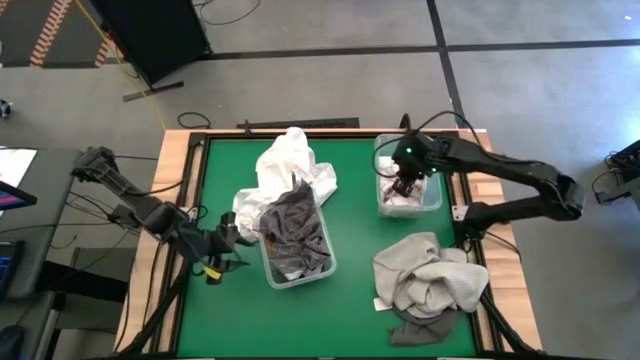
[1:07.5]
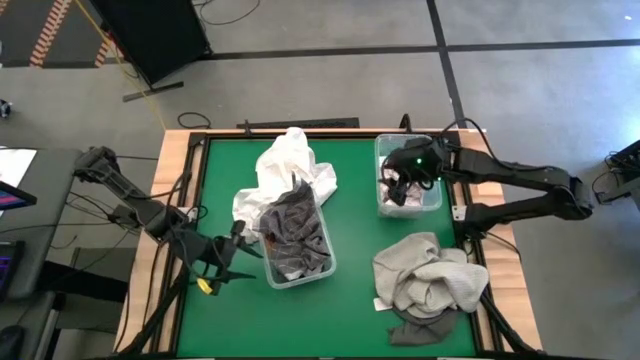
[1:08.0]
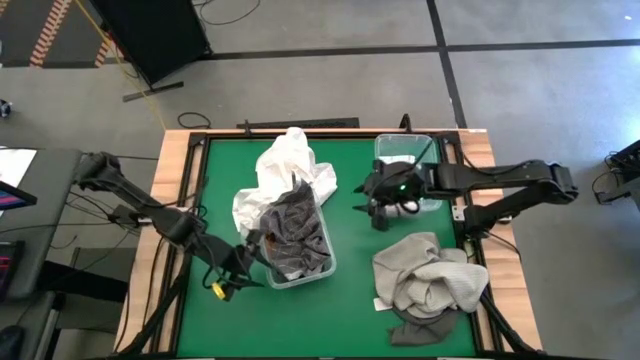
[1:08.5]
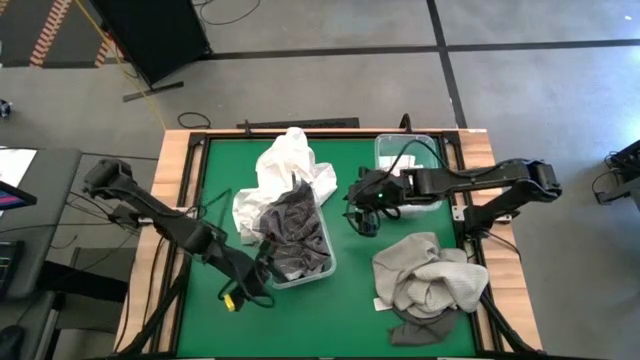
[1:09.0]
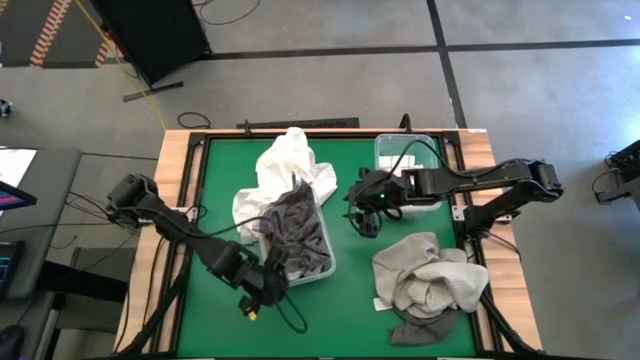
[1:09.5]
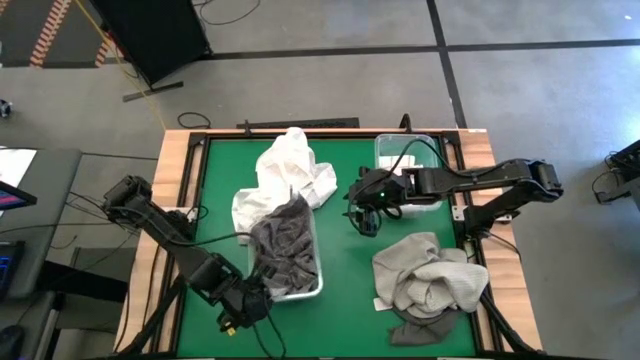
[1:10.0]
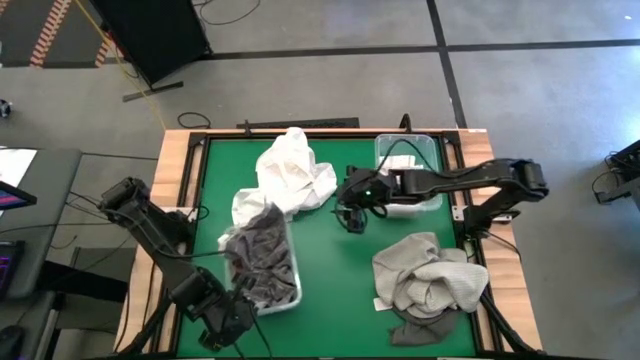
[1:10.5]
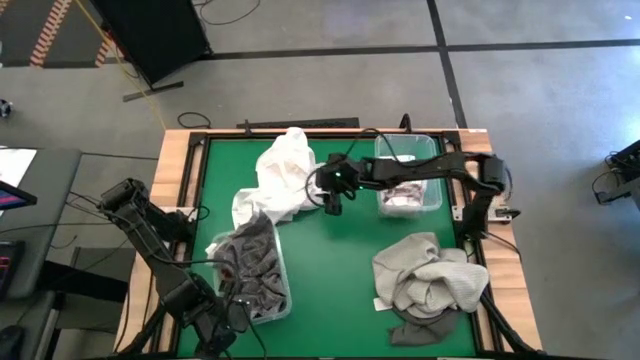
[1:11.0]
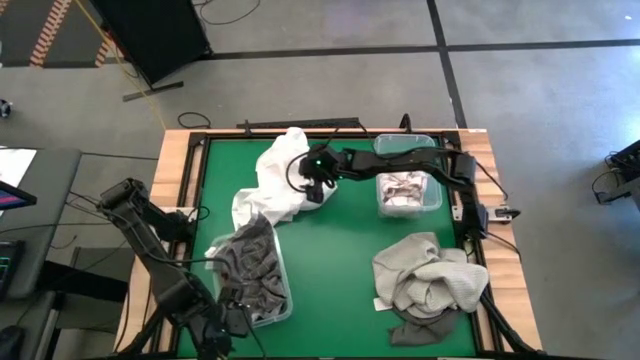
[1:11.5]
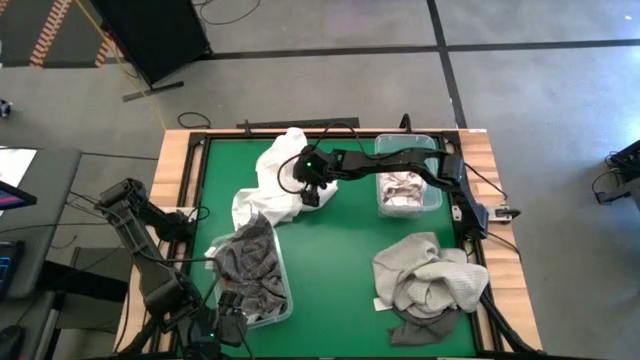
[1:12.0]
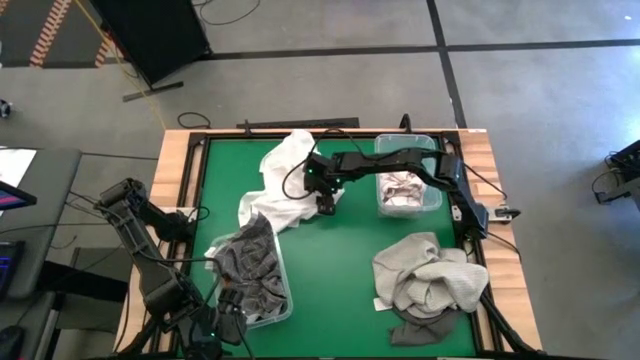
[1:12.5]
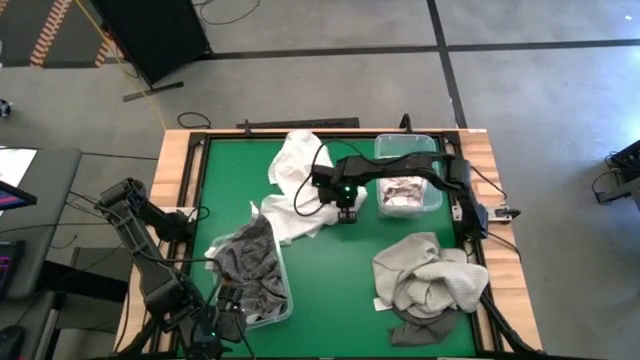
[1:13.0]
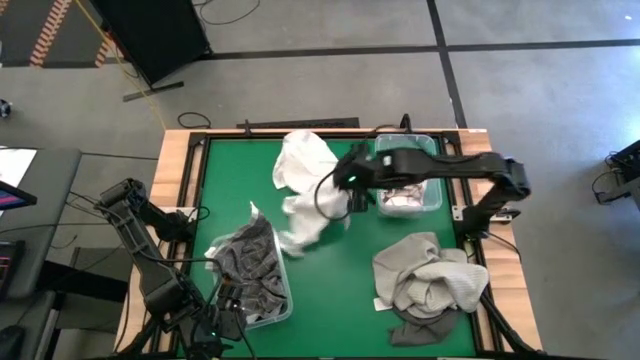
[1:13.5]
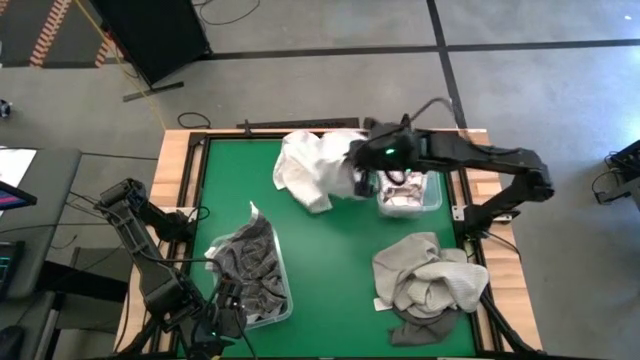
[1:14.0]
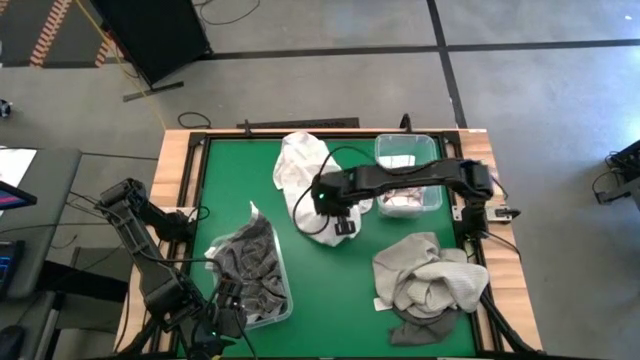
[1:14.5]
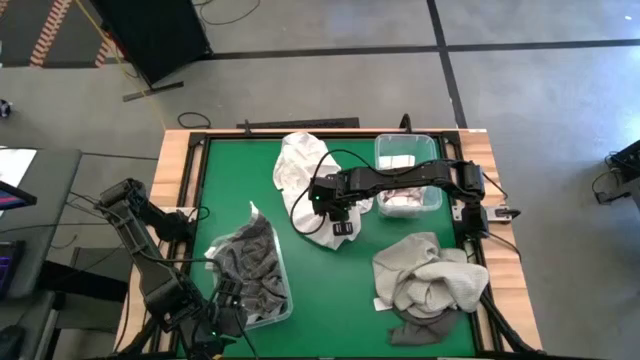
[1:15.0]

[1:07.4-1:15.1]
Task: Sort towels by color in basket
Put the white towel into the top transparent bin

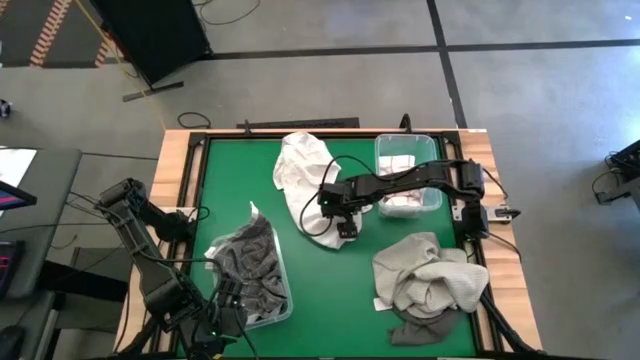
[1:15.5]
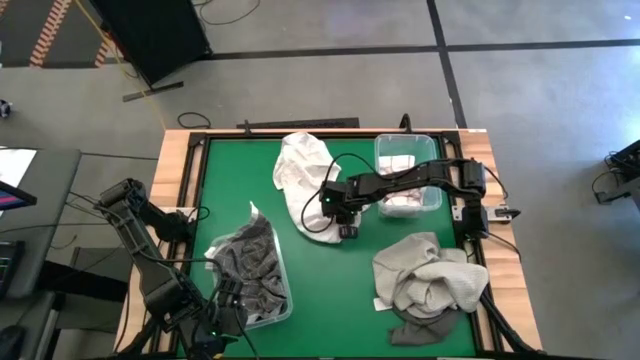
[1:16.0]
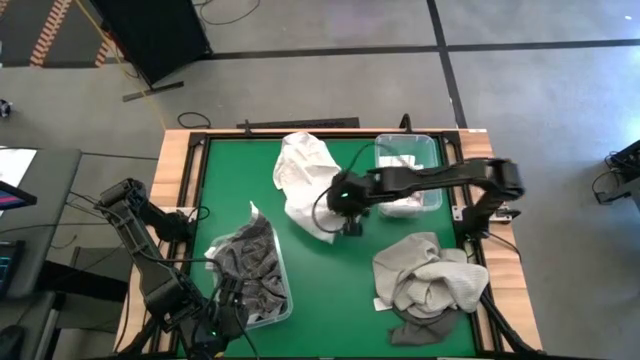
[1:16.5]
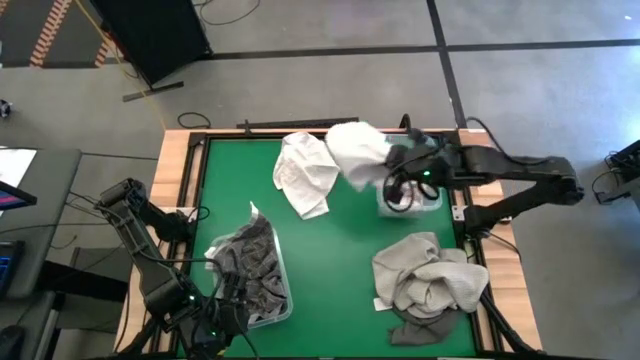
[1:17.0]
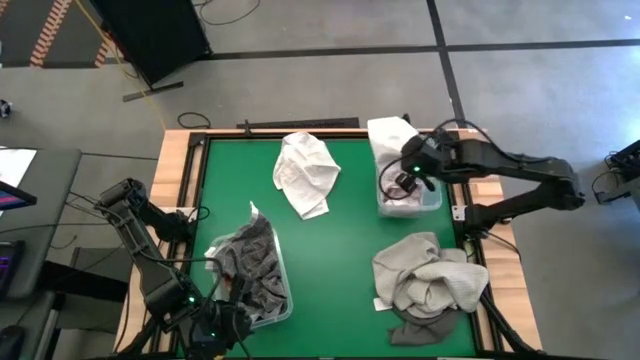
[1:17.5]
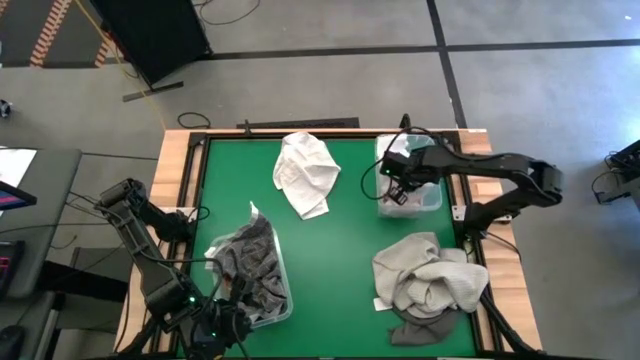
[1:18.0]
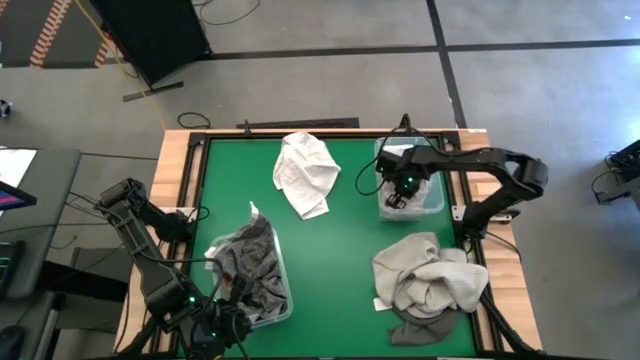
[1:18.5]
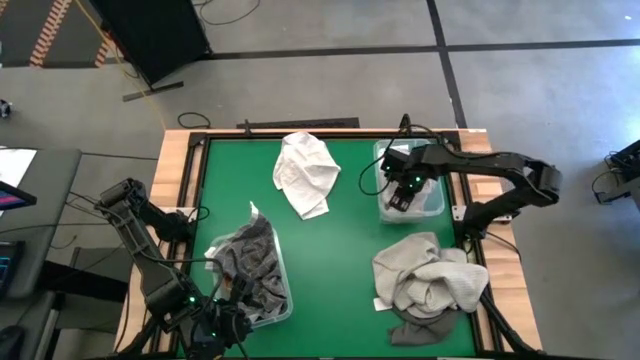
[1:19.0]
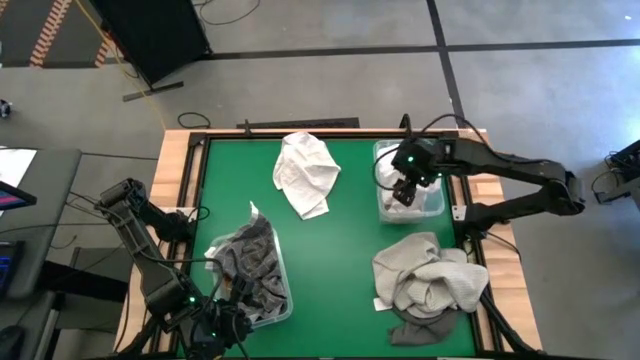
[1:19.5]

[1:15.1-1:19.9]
Put the white towel into the top transparent bin

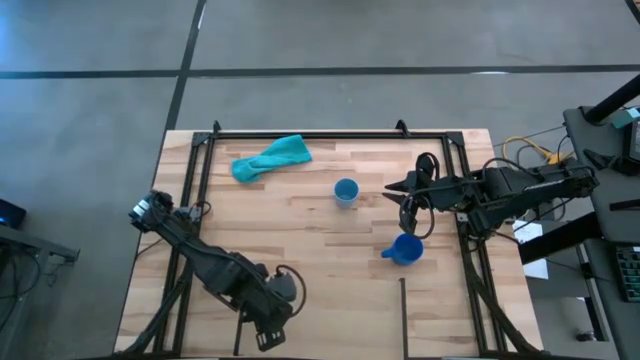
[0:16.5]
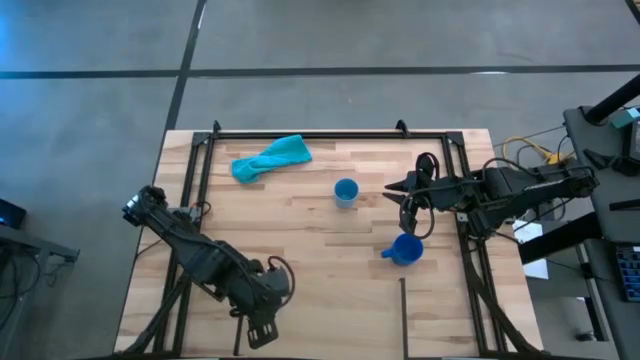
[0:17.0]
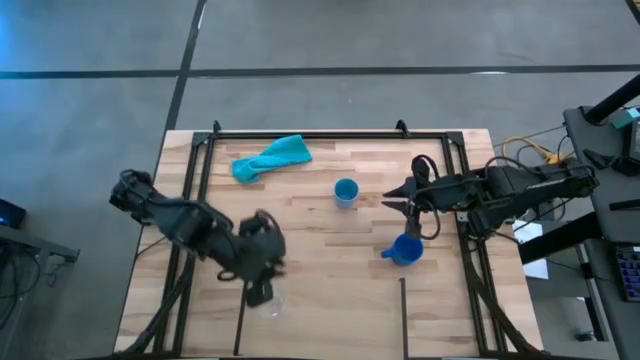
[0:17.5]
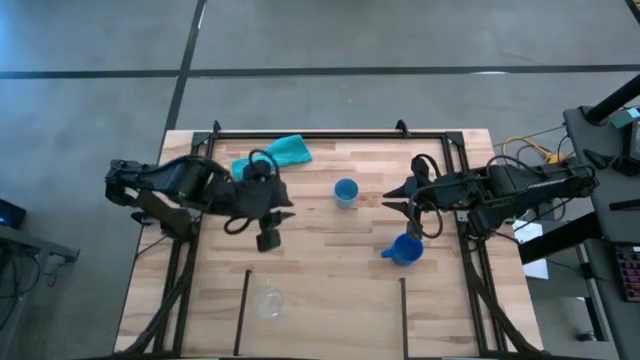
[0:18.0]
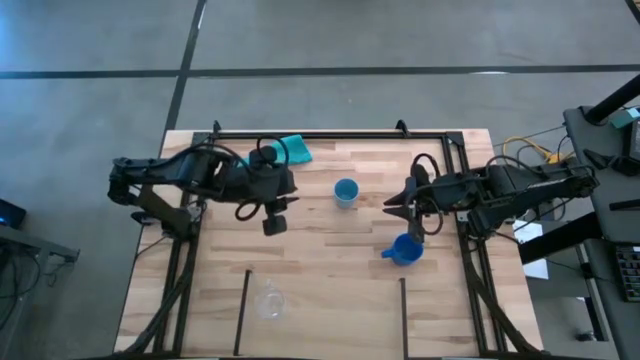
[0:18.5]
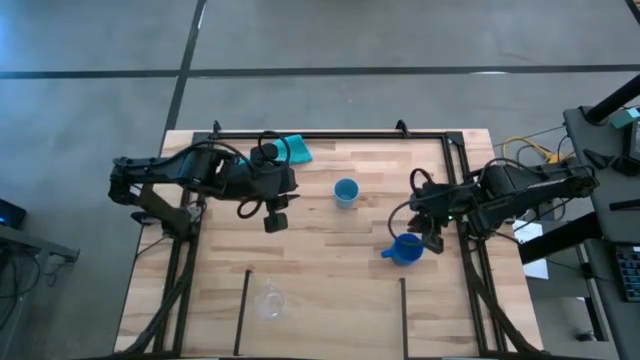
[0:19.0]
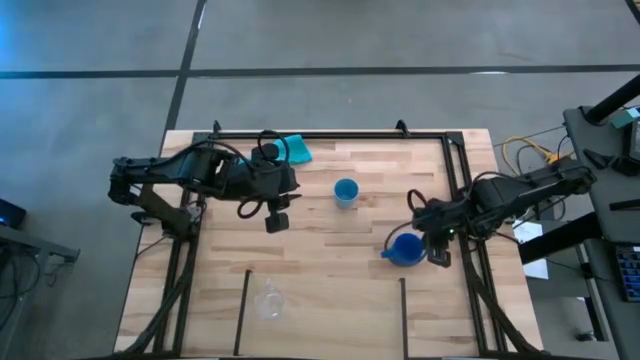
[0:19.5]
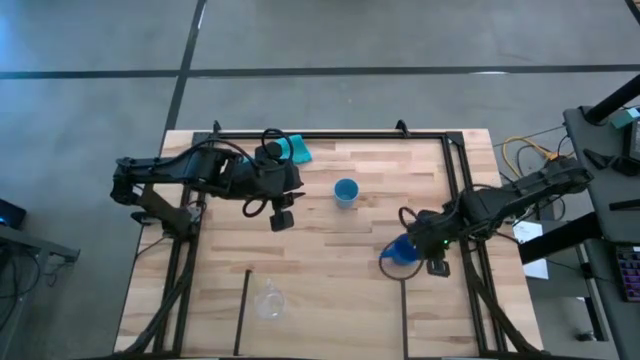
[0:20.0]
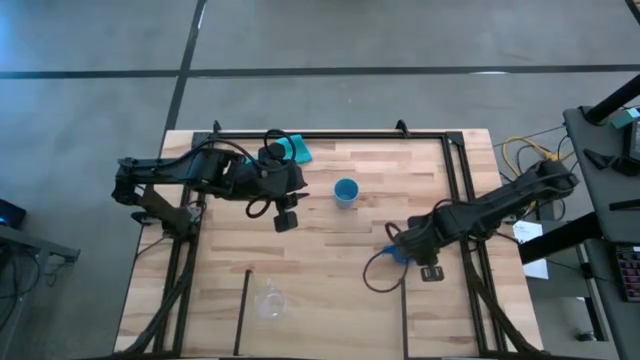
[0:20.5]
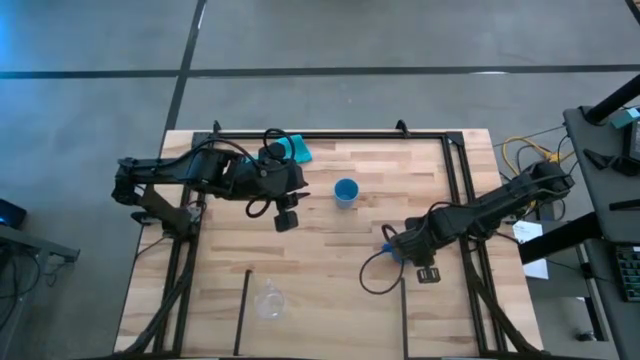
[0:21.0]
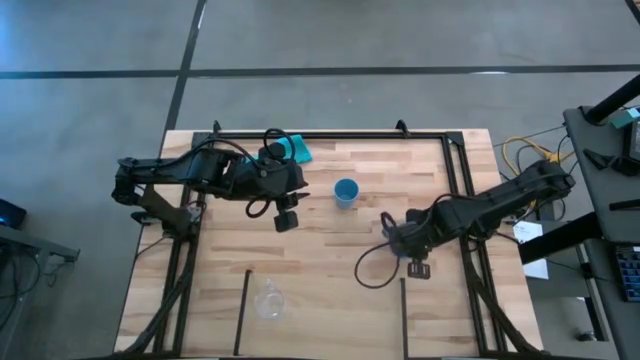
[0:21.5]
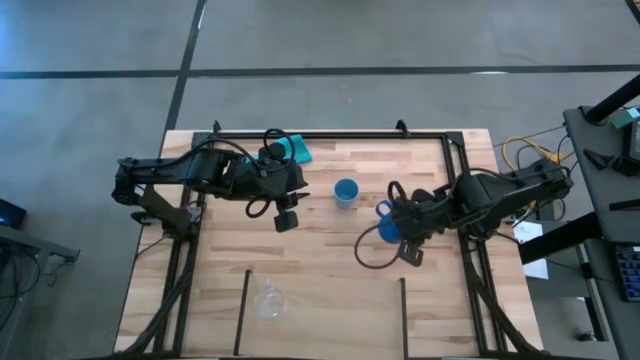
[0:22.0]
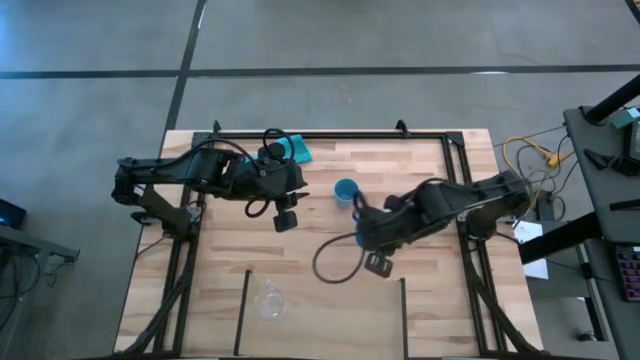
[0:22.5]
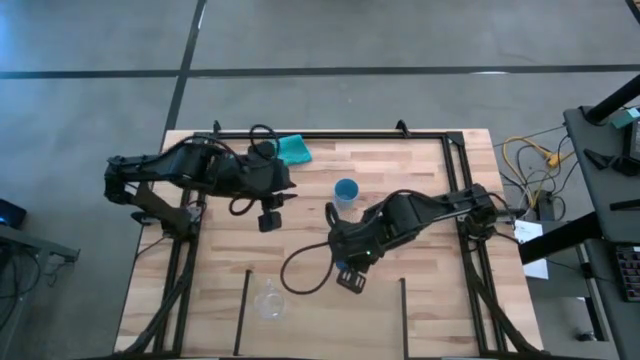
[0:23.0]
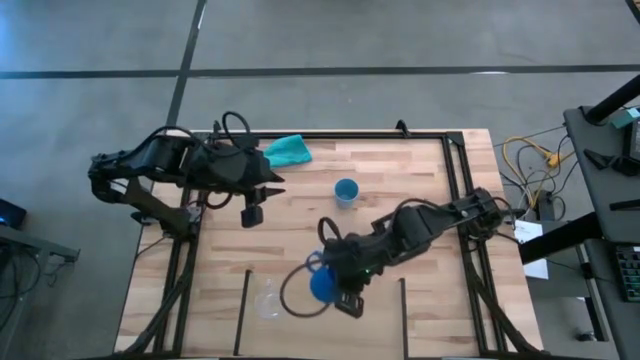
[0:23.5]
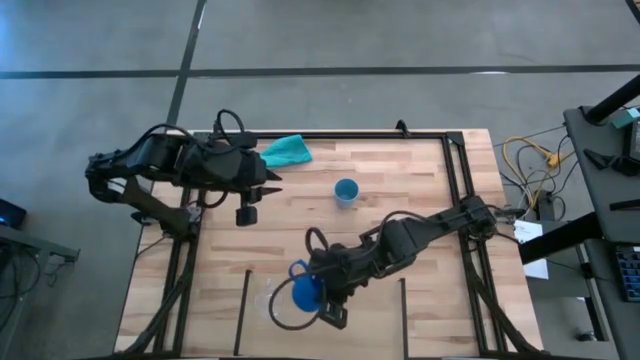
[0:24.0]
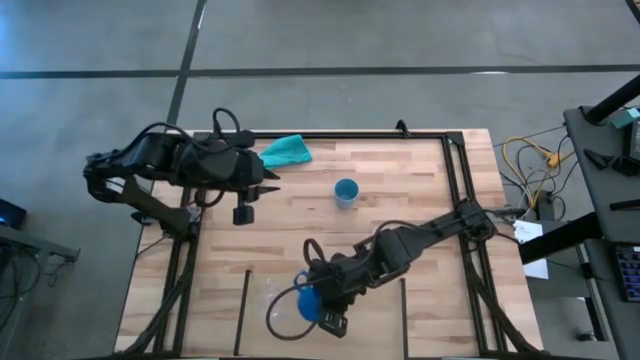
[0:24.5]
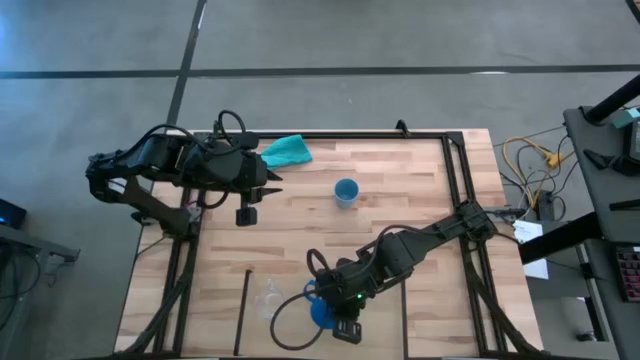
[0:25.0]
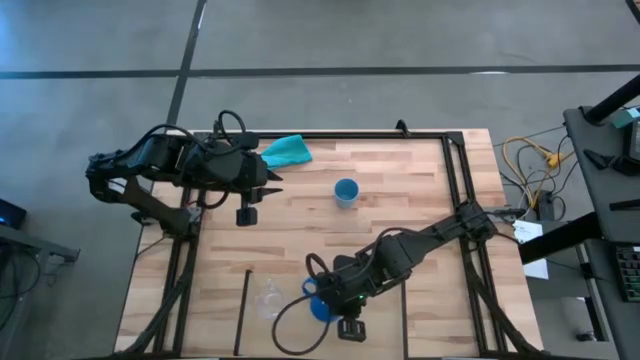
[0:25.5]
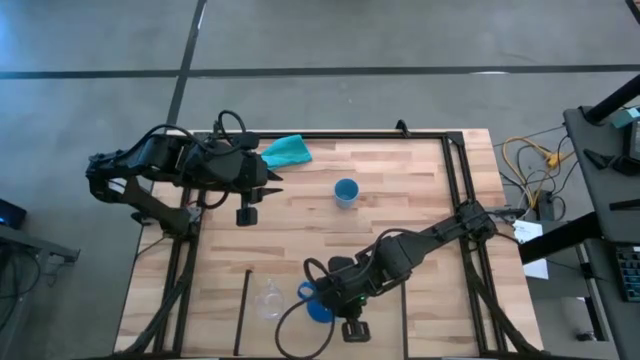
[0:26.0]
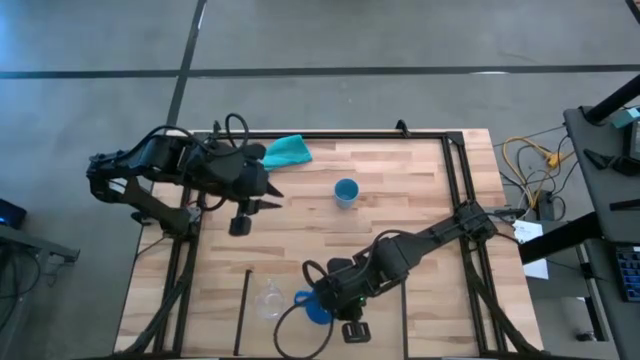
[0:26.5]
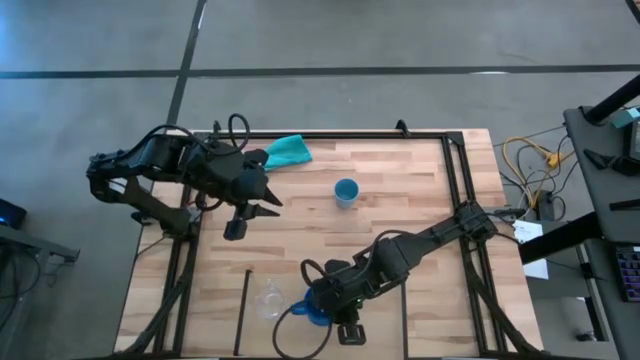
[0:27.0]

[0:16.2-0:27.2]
Task: Stack small to large cups/mugs on shelf
Put the blue mug on the shelf
